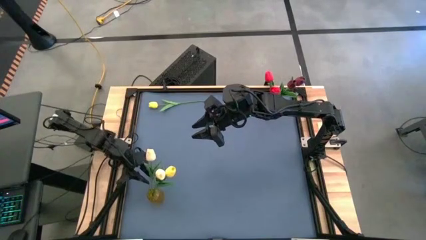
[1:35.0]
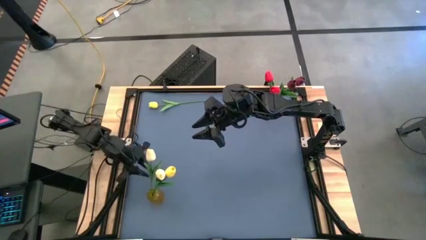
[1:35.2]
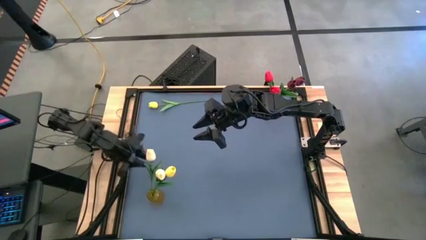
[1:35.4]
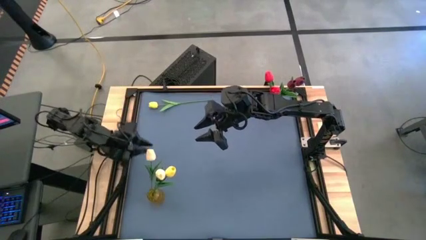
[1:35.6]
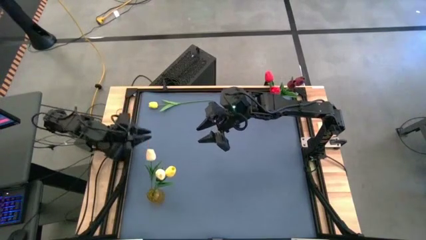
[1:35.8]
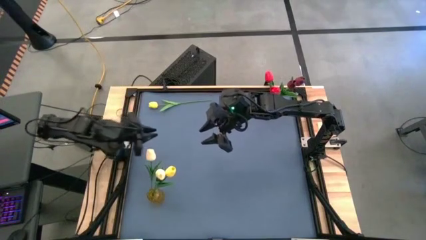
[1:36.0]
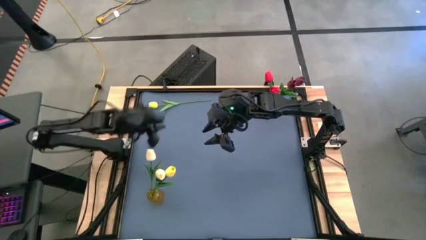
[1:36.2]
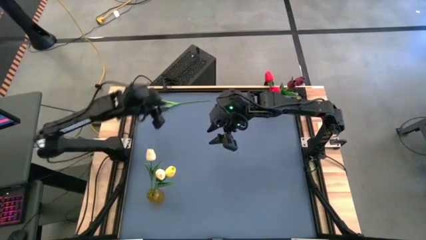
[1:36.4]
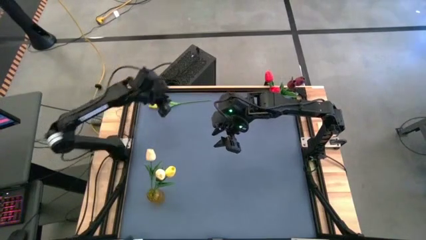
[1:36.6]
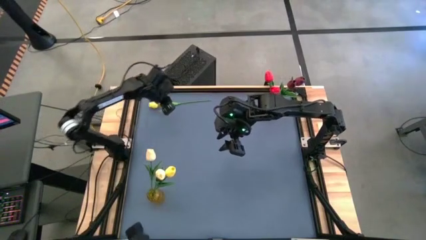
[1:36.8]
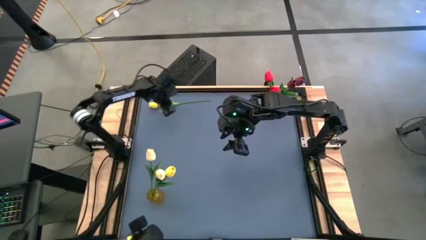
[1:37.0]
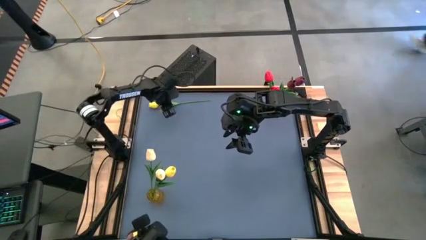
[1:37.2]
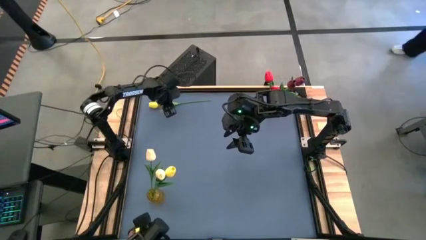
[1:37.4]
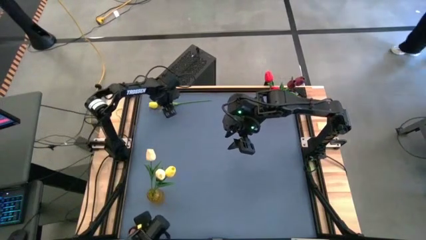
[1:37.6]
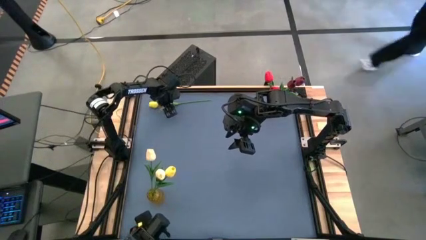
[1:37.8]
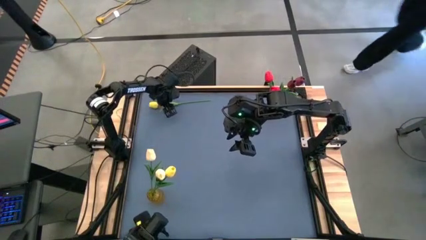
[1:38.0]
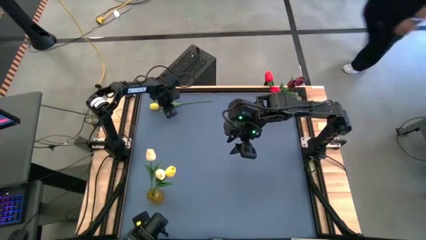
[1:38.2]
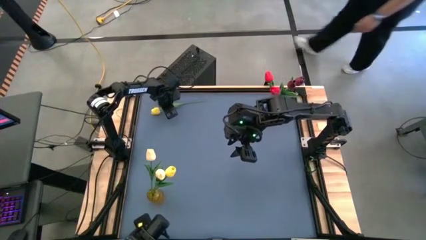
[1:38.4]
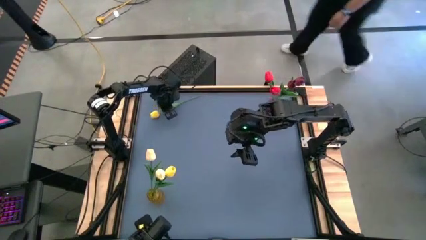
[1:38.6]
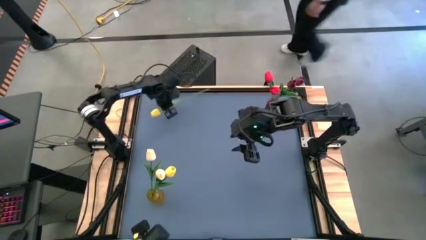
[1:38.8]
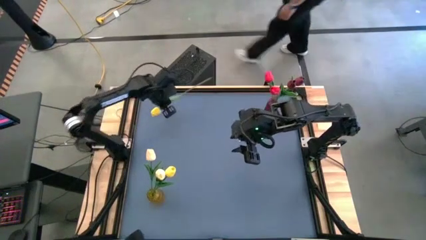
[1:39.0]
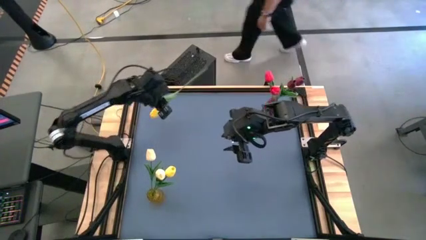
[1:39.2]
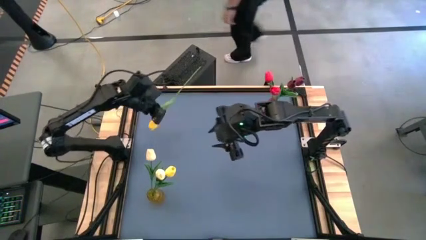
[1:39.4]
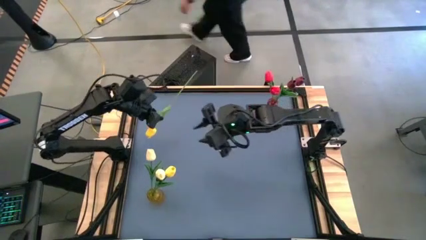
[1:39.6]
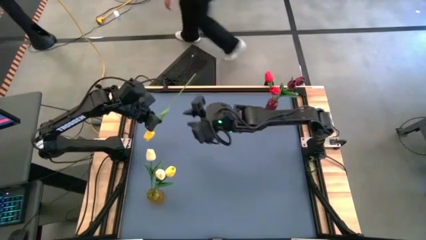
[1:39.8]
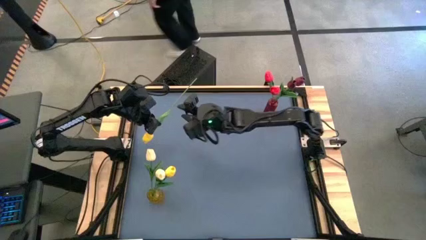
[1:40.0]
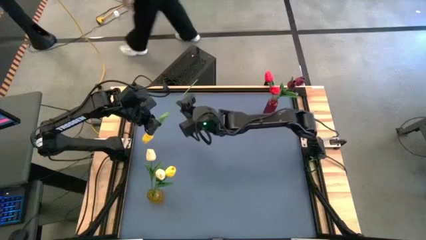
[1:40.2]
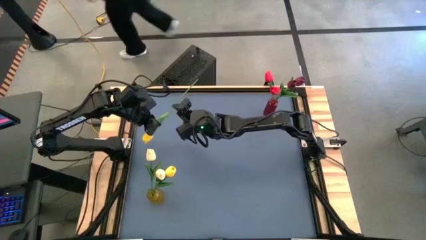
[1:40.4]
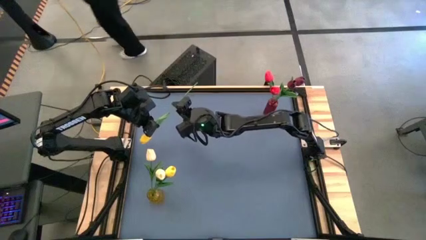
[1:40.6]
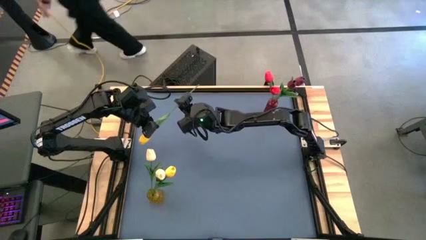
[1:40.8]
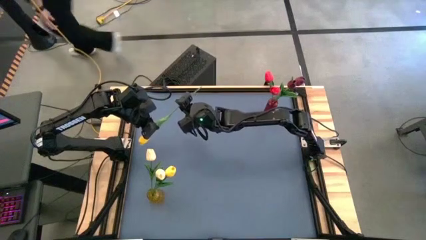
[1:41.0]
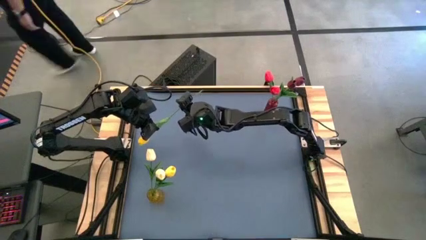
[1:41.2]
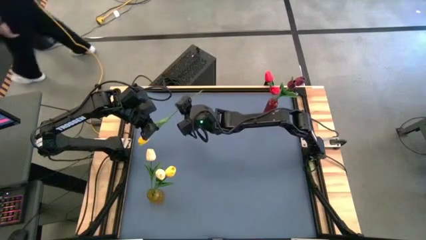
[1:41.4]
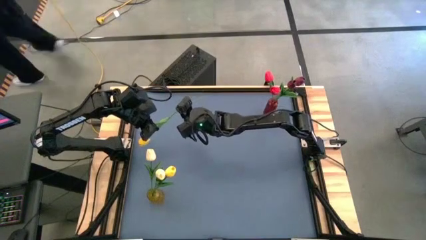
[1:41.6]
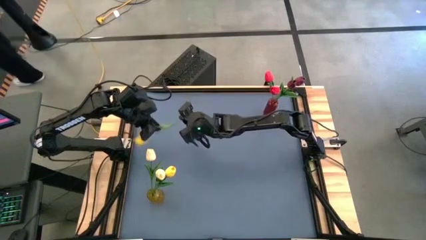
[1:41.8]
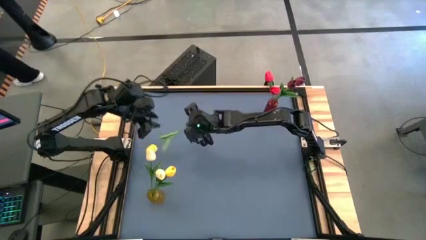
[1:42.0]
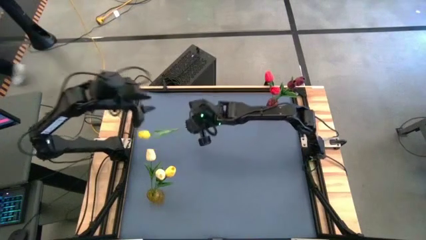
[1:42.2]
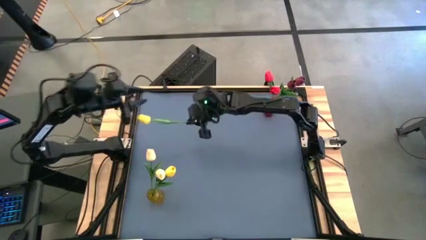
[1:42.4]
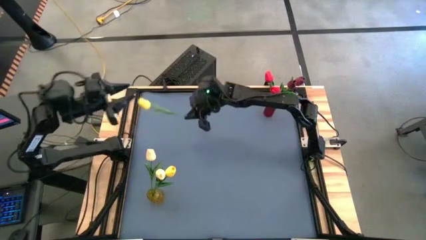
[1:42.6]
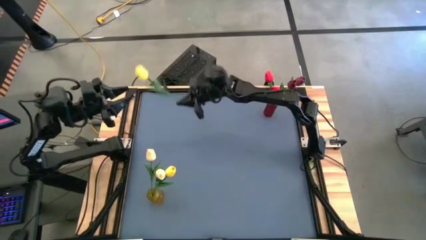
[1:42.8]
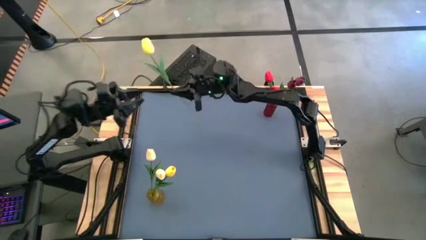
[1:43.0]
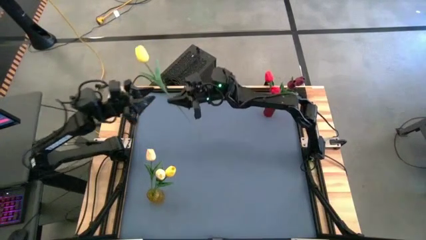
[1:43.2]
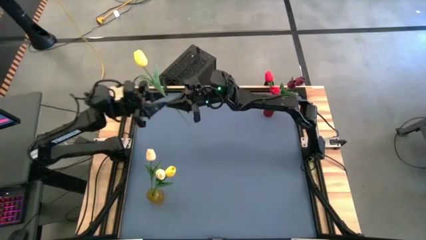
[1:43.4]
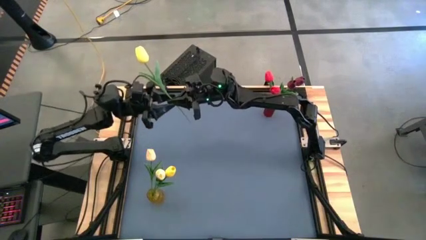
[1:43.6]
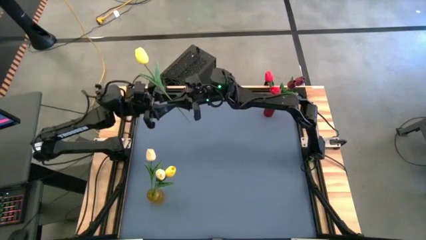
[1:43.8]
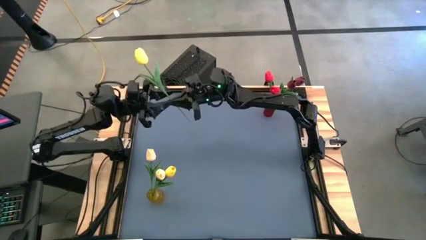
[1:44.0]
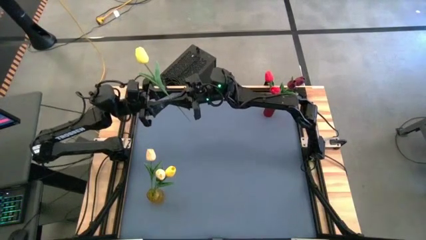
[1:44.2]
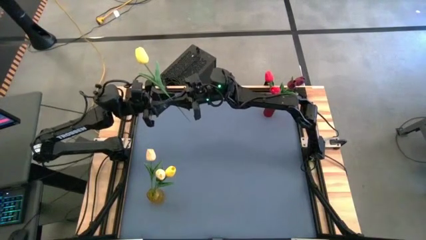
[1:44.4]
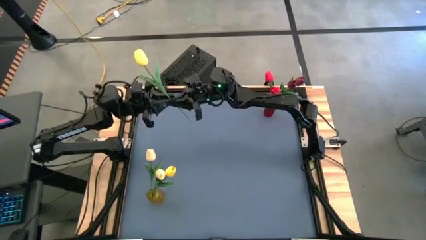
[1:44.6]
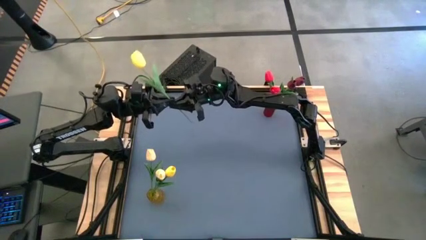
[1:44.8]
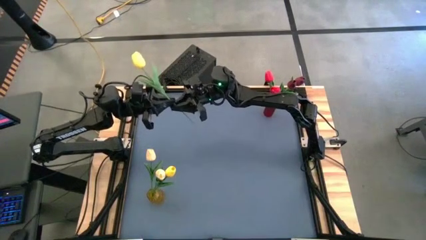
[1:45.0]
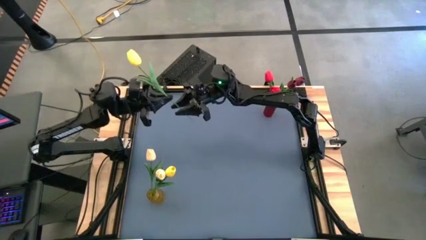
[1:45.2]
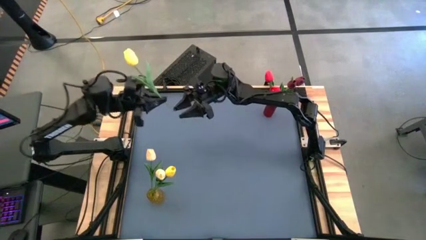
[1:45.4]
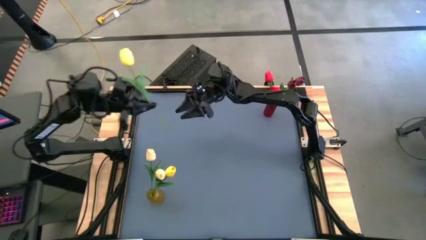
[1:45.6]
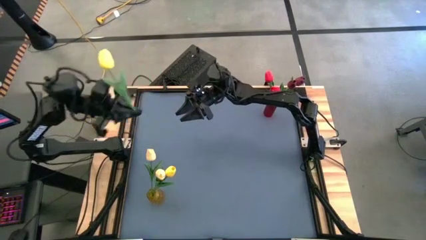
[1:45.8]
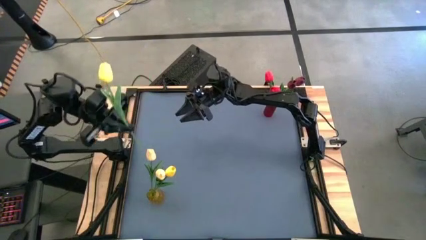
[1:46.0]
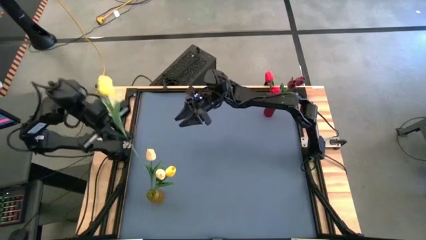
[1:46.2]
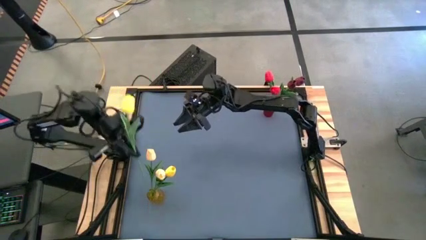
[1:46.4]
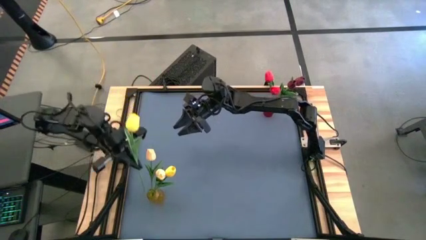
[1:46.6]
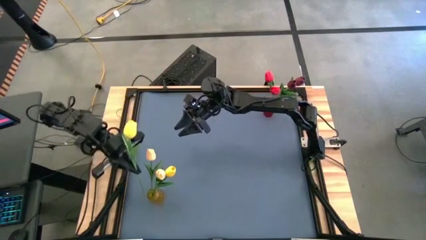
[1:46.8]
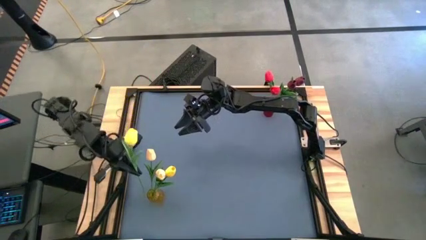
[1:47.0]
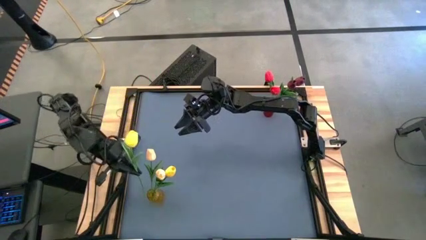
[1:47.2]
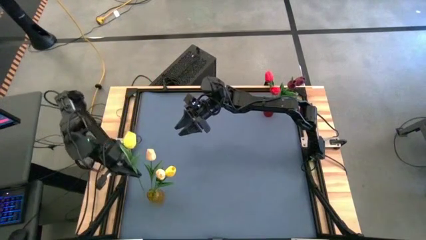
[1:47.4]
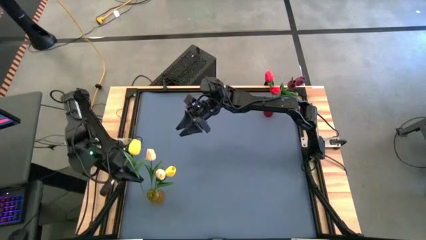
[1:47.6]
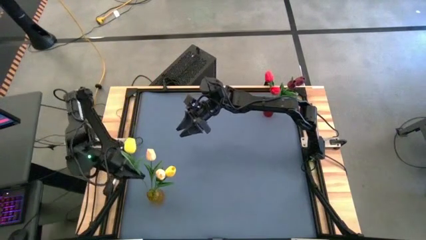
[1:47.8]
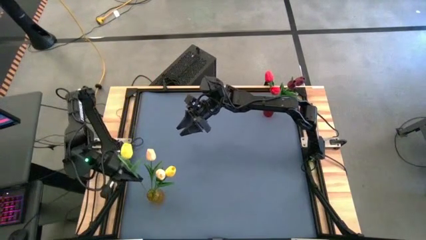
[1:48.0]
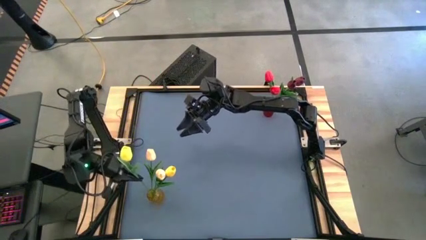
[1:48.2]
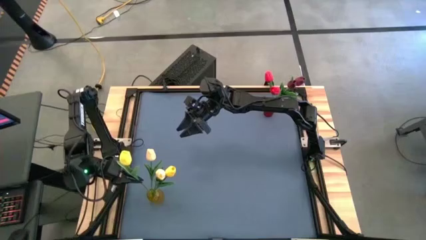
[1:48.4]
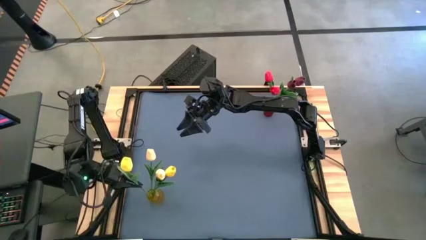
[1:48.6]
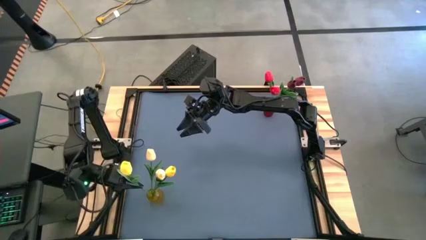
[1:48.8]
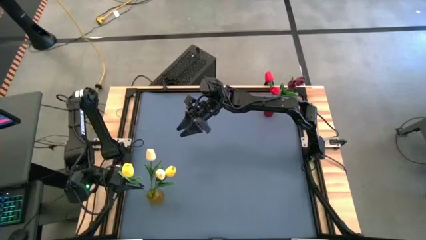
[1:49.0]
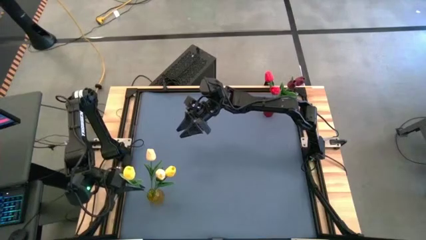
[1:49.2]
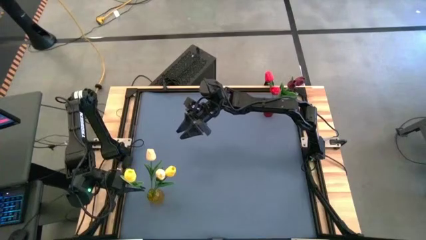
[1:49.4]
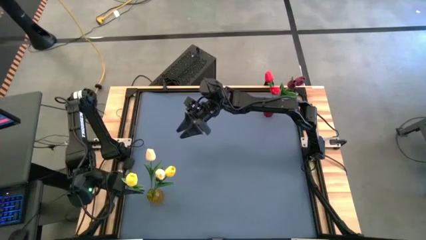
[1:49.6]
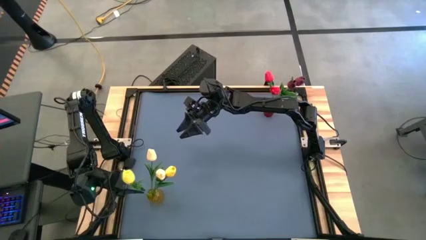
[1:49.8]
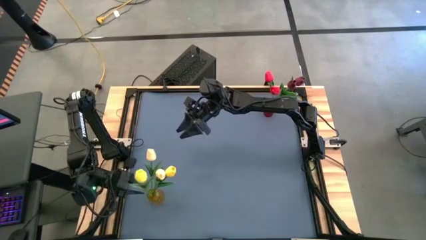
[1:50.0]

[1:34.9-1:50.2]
Task: Sort flowers into vase by color
Put the yellow flower into the yellow vase
